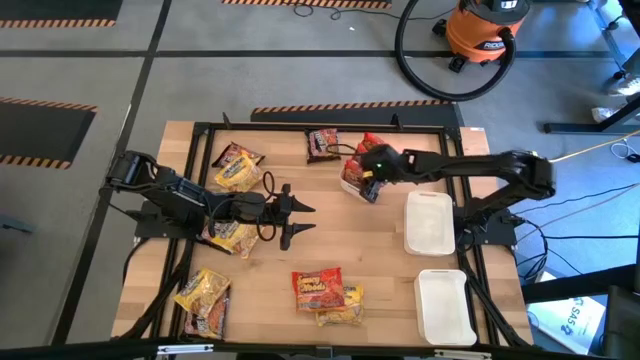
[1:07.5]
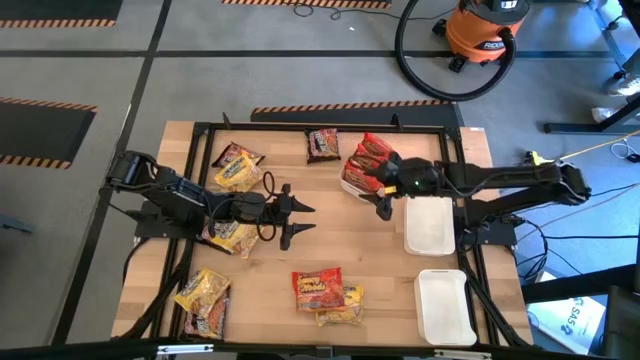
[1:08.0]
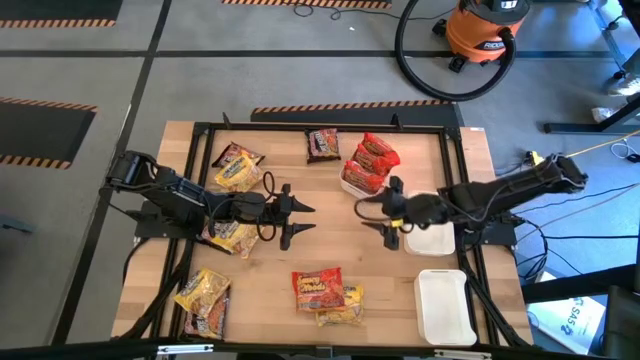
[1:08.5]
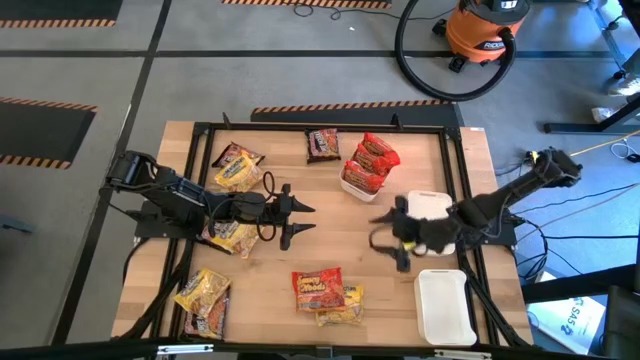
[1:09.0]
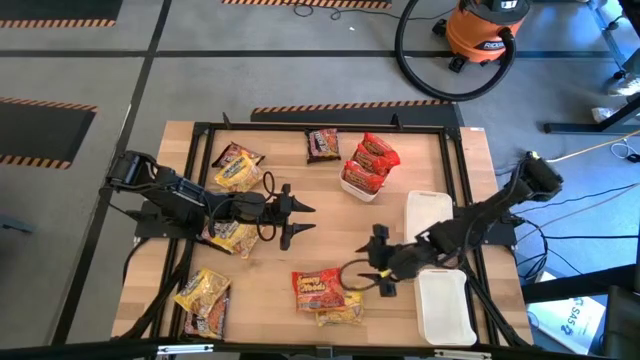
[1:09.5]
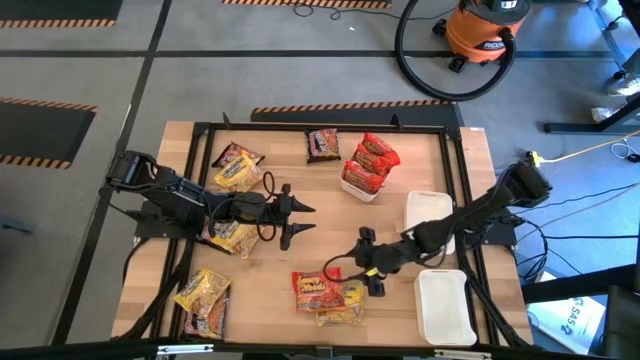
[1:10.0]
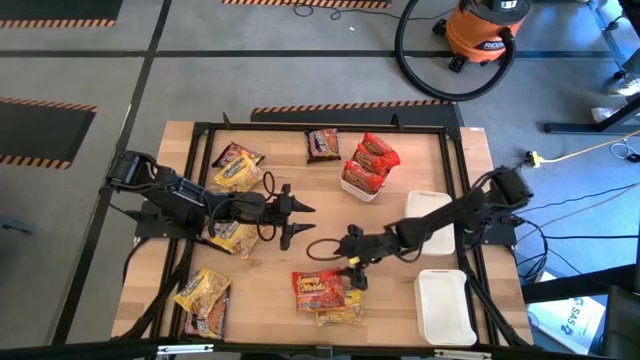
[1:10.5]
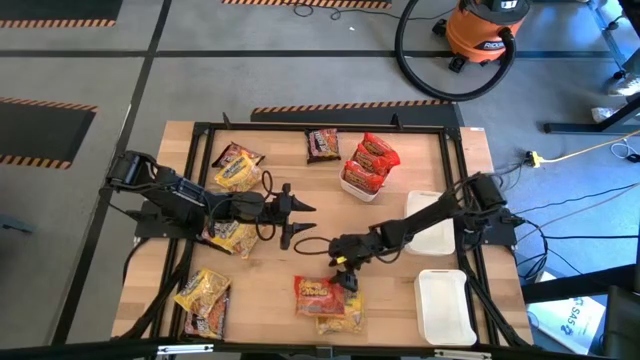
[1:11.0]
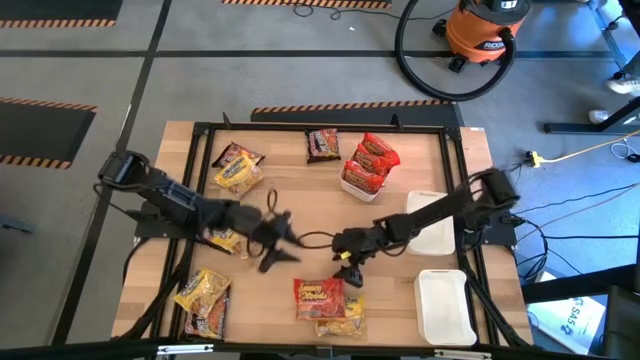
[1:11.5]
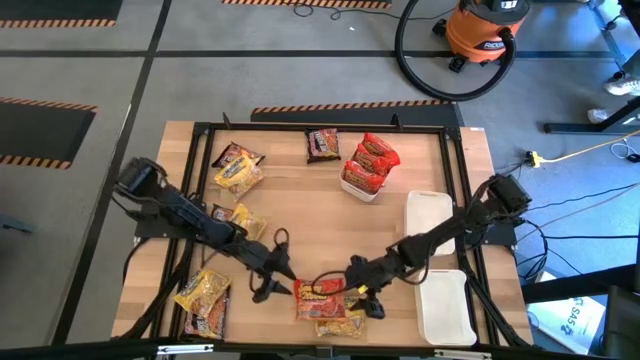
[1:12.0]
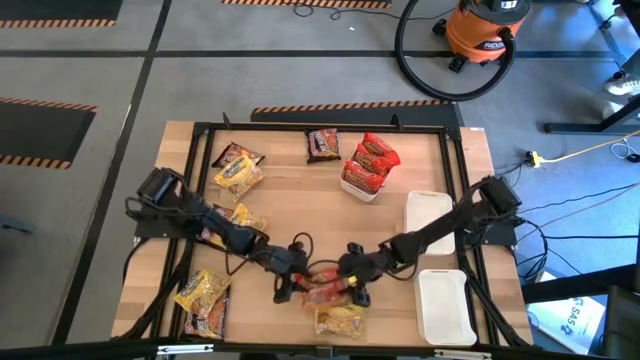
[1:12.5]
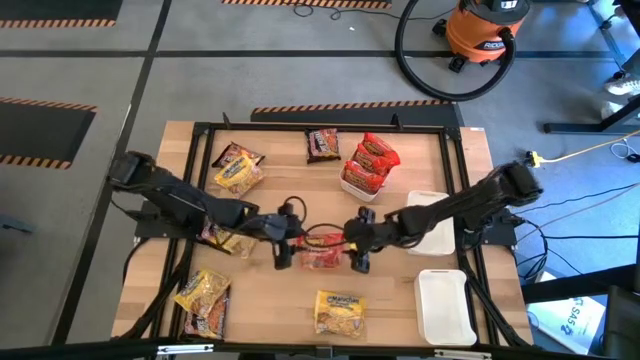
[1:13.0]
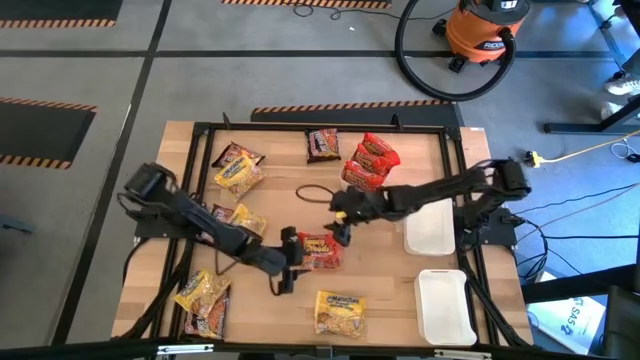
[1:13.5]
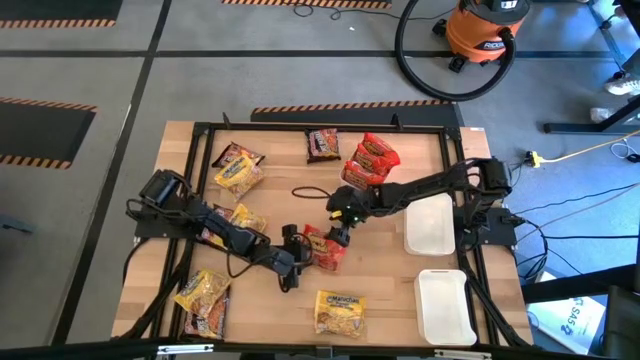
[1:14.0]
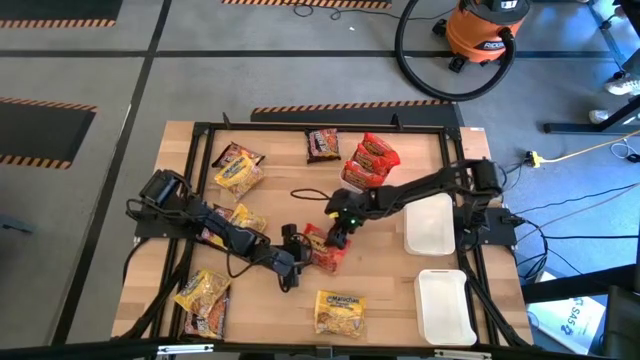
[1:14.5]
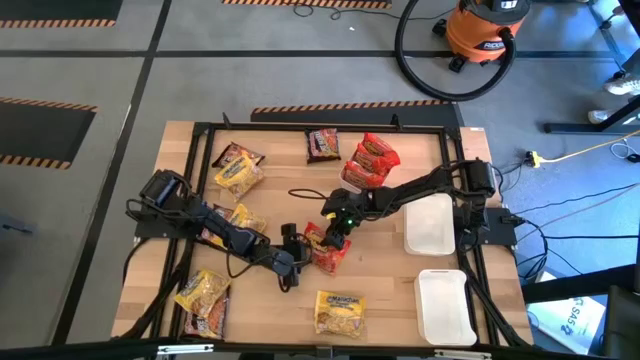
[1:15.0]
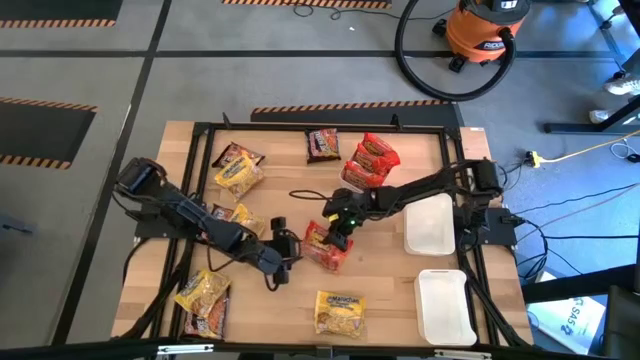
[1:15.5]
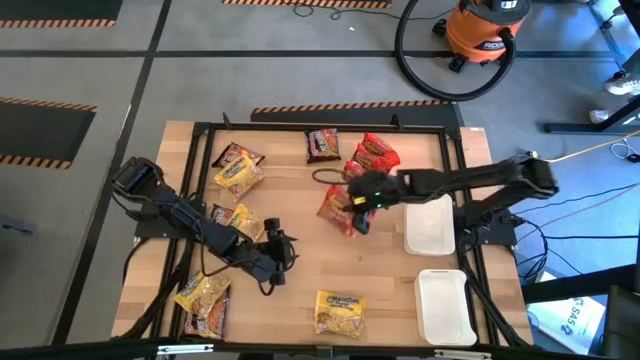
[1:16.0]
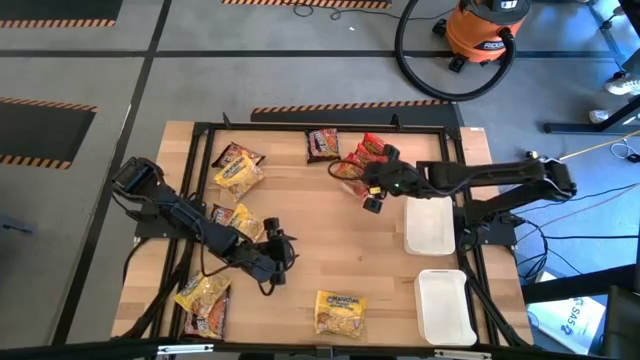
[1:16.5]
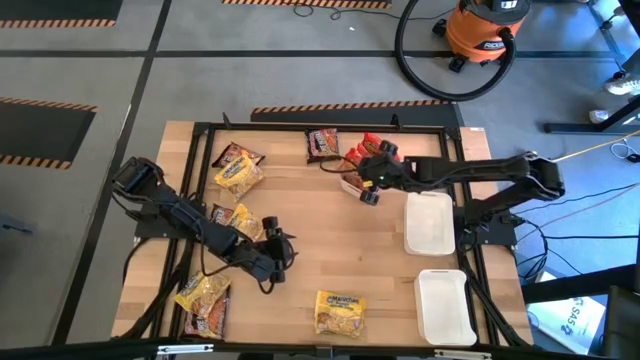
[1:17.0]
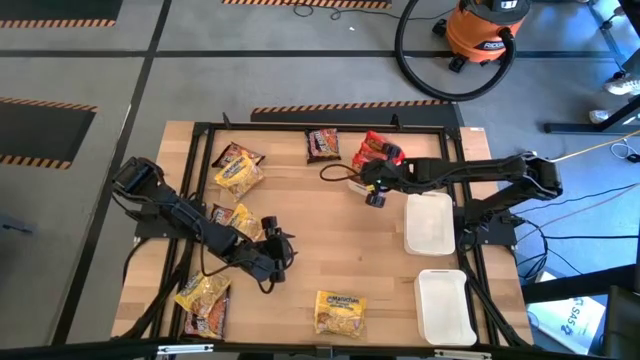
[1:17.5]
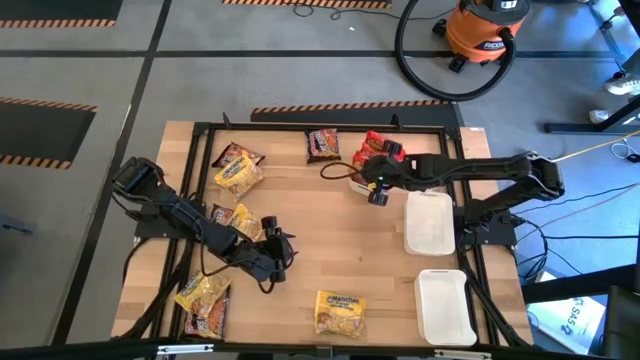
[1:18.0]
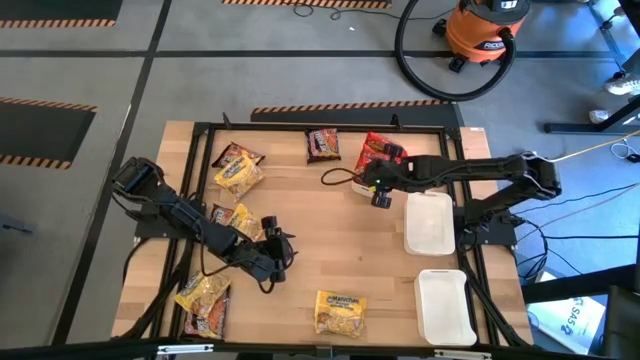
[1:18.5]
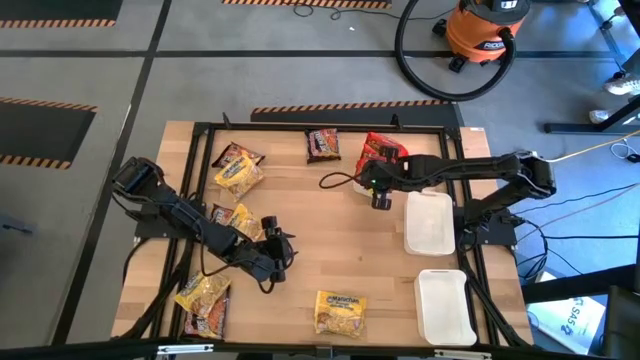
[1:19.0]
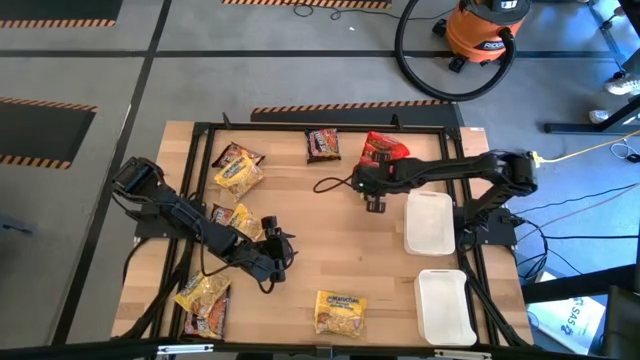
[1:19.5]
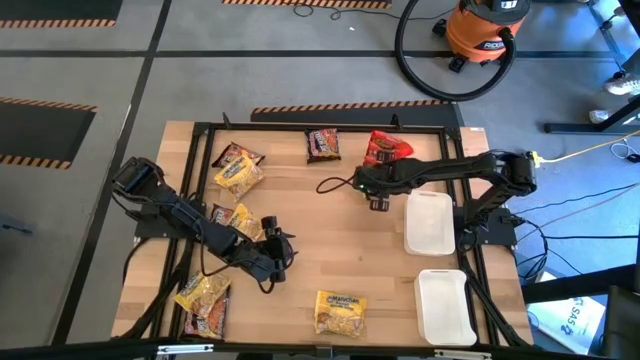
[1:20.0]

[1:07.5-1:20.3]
Task: Sort Maruchan noodles
Put the orange noodle pack into the top white bin

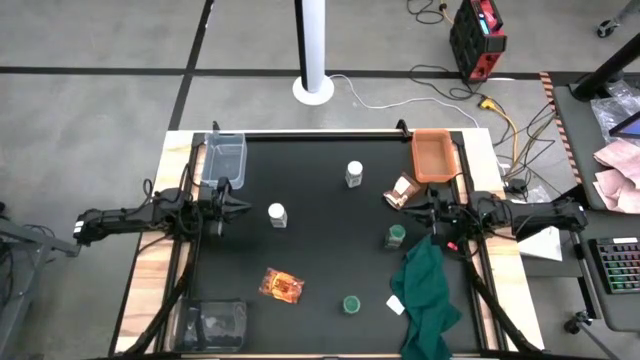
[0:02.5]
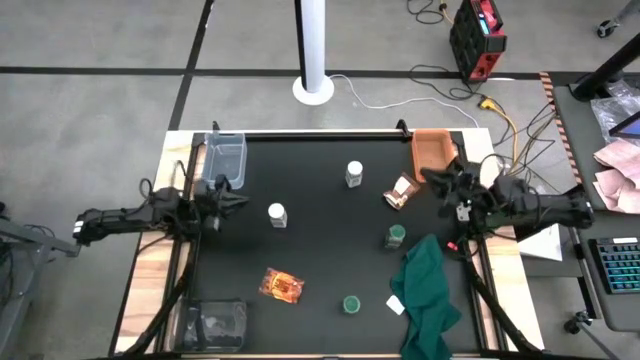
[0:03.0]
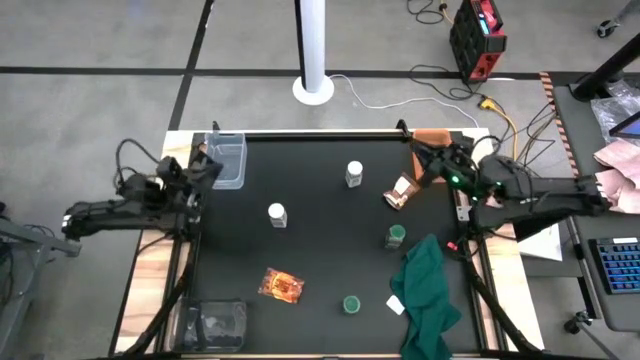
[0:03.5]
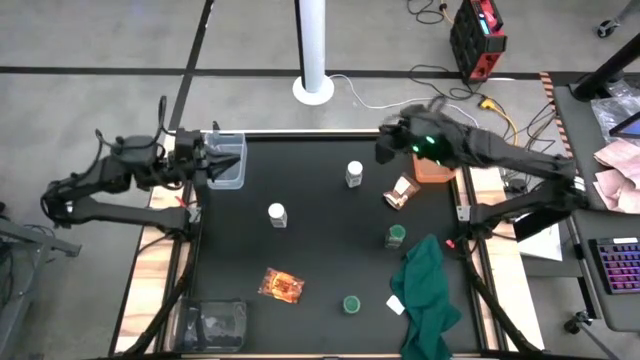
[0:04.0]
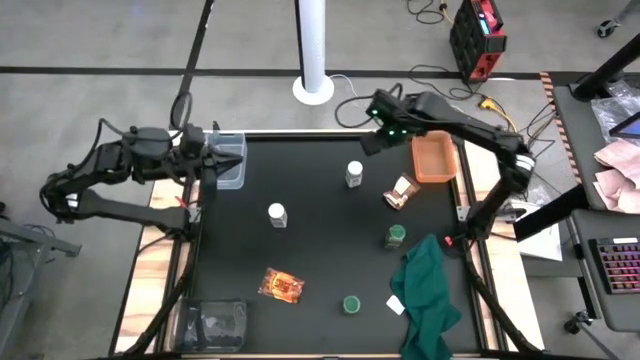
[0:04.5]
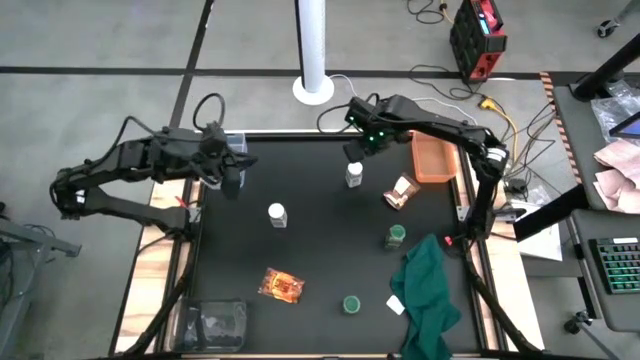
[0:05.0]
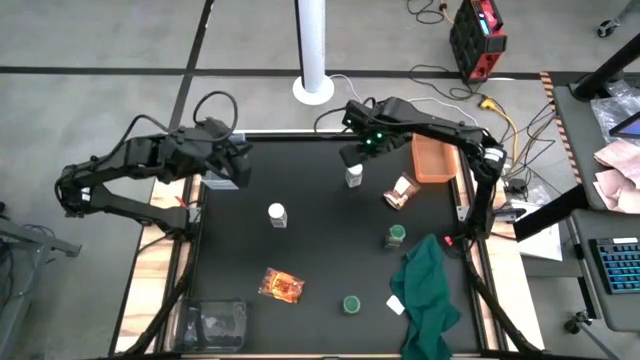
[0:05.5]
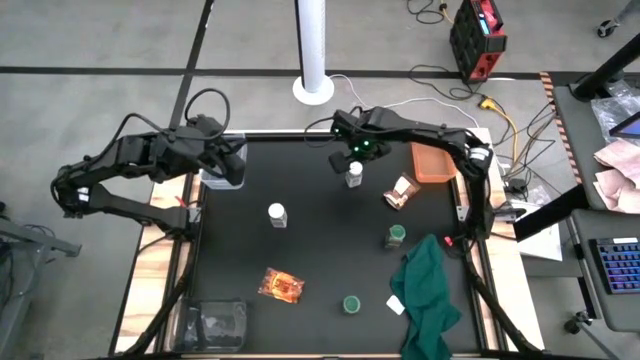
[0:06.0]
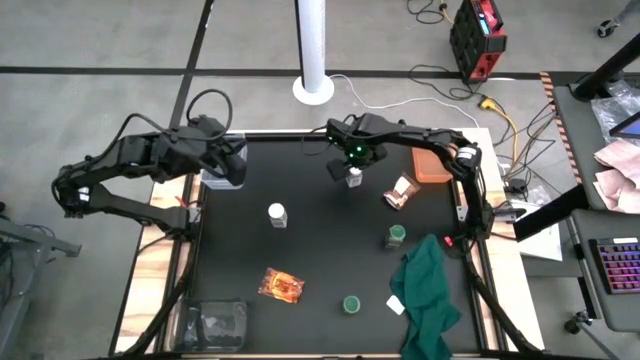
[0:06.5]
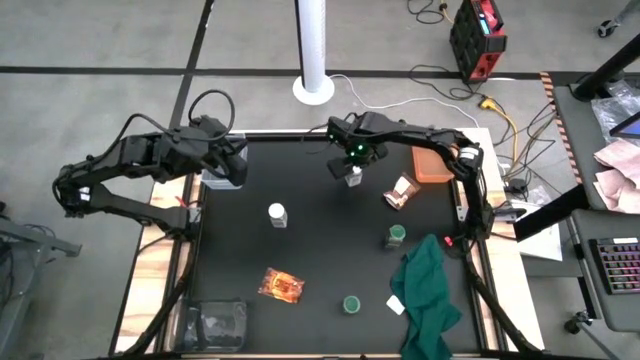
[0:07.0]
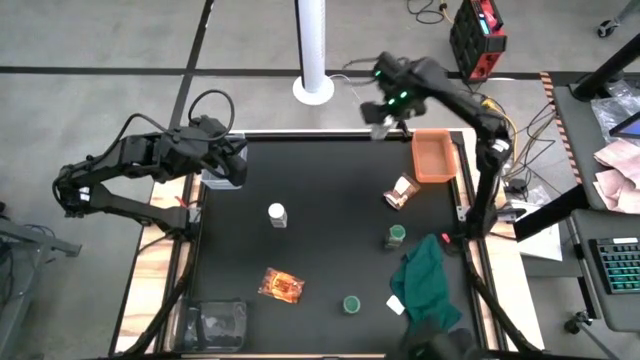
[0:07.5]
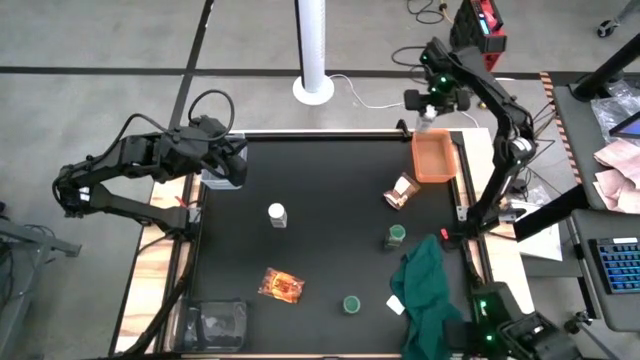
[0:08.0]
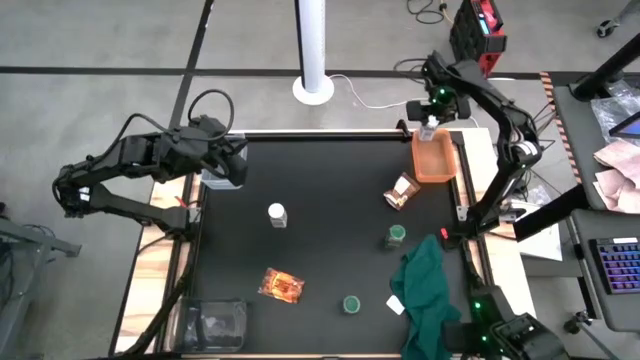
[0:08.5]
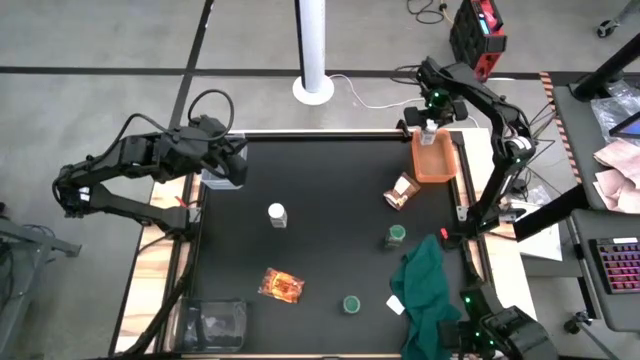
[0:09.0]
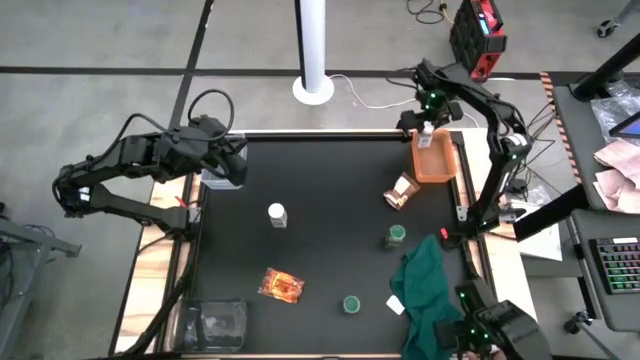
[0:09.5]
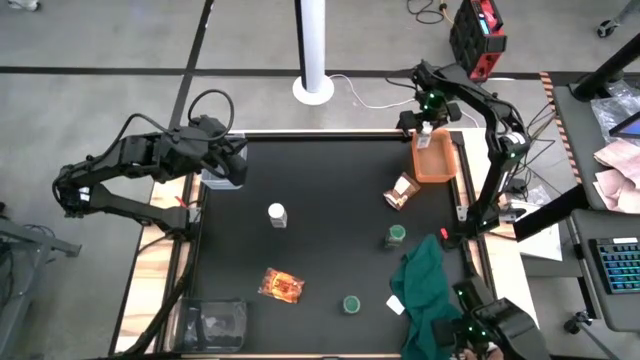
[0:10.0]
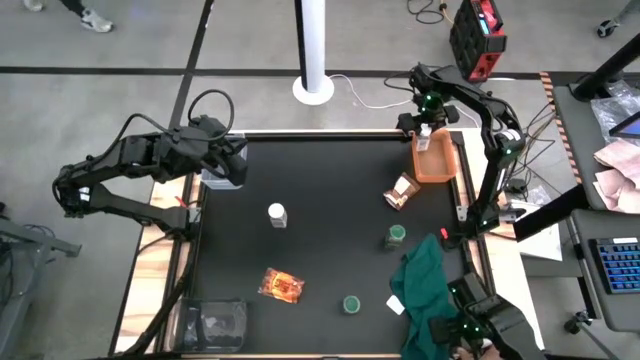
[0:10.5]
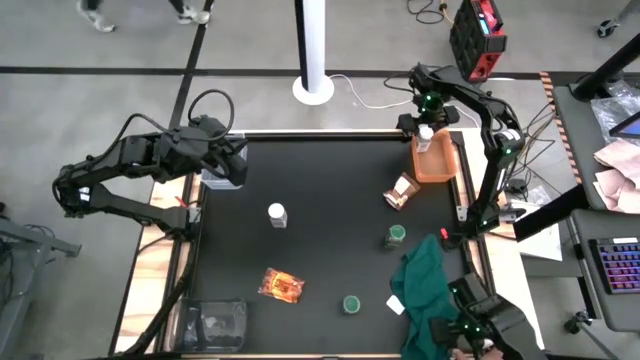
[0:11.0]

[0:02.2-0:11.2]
Task: Sort spices by type
Put the right white seasoning bottle into the orange bin
